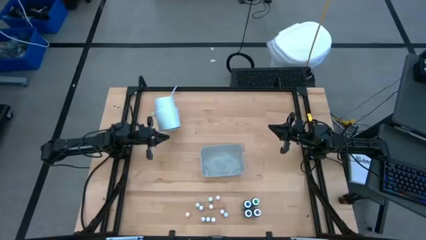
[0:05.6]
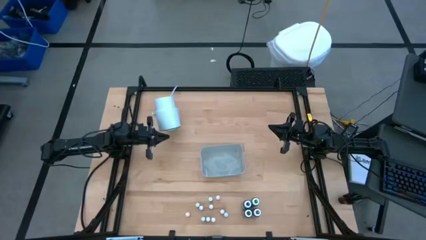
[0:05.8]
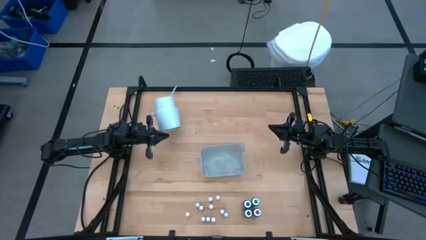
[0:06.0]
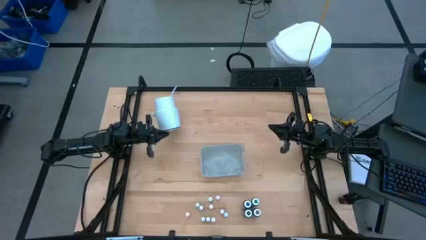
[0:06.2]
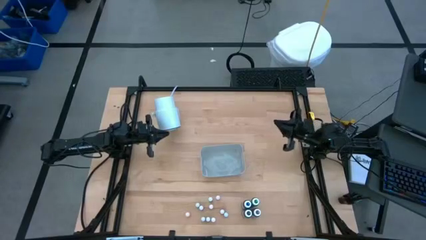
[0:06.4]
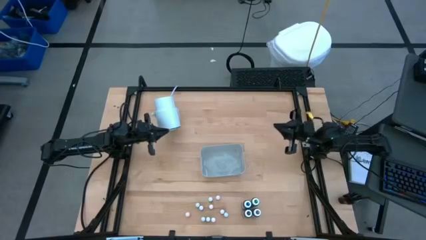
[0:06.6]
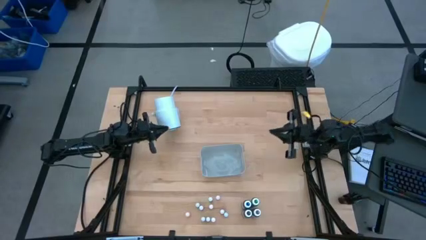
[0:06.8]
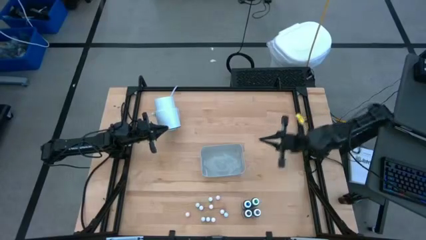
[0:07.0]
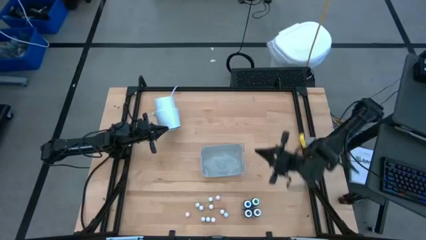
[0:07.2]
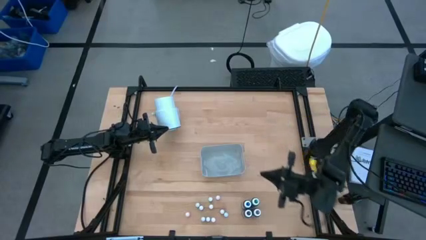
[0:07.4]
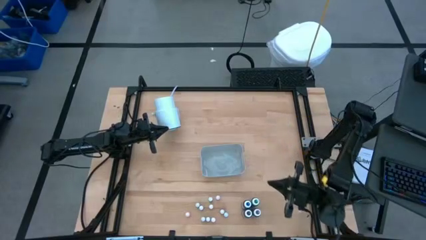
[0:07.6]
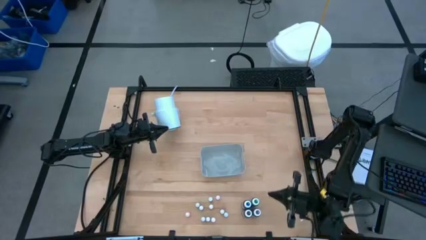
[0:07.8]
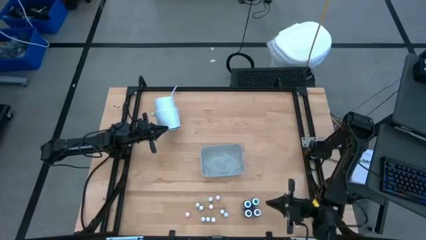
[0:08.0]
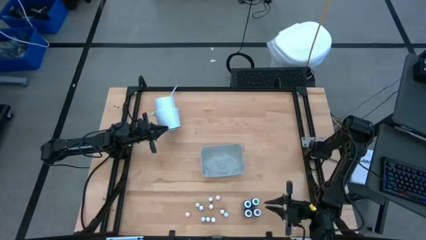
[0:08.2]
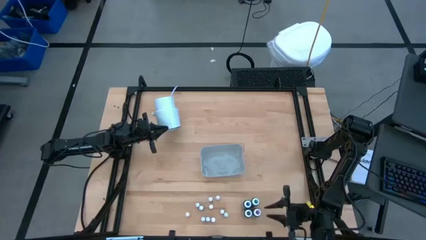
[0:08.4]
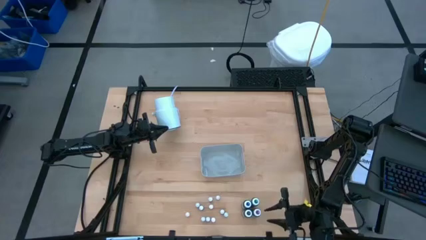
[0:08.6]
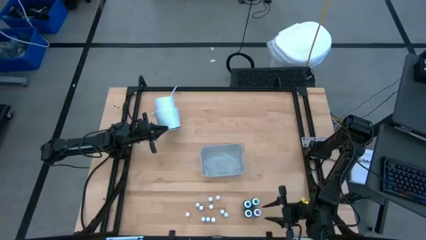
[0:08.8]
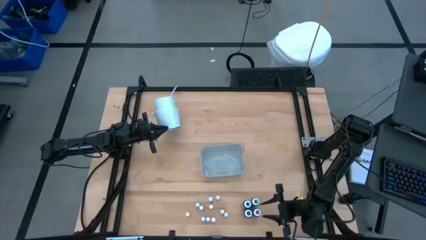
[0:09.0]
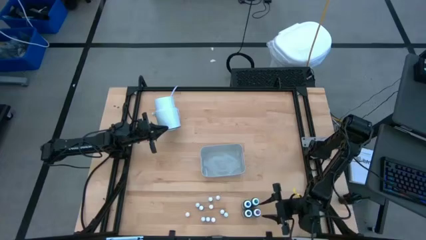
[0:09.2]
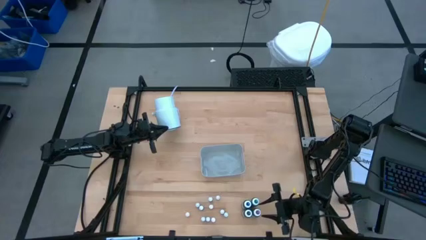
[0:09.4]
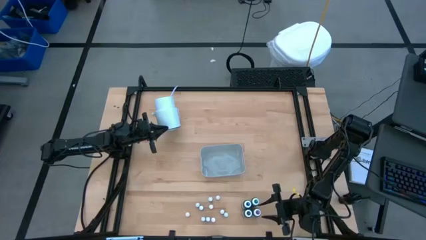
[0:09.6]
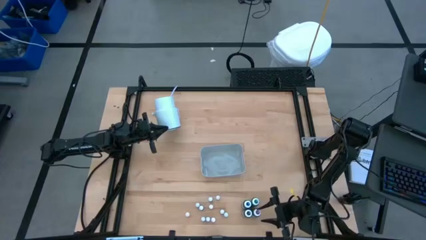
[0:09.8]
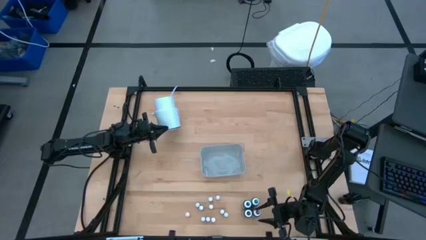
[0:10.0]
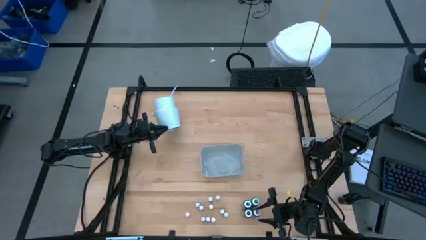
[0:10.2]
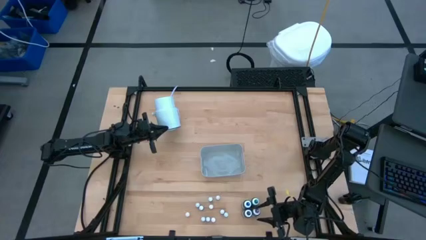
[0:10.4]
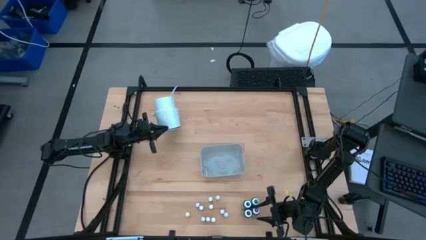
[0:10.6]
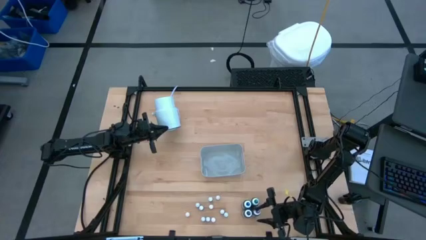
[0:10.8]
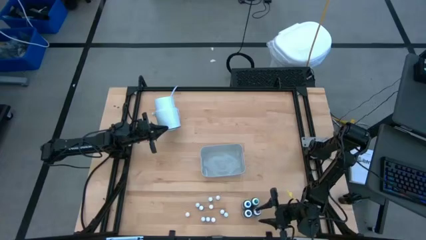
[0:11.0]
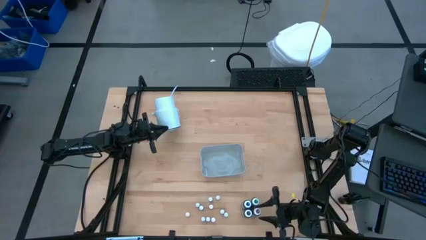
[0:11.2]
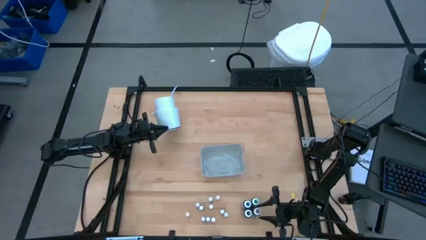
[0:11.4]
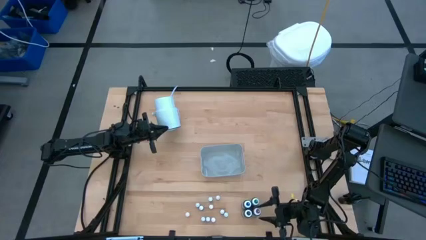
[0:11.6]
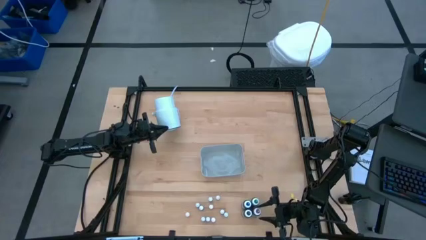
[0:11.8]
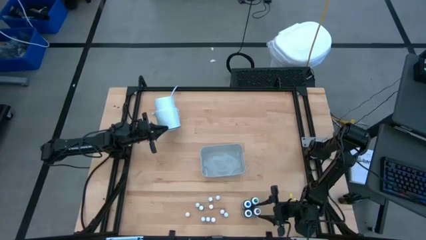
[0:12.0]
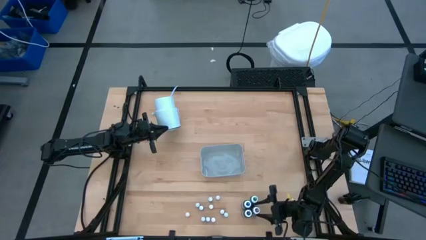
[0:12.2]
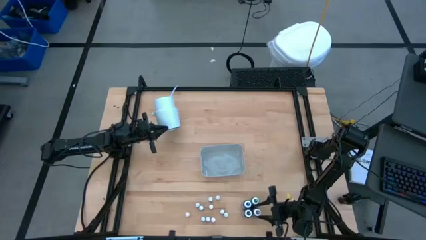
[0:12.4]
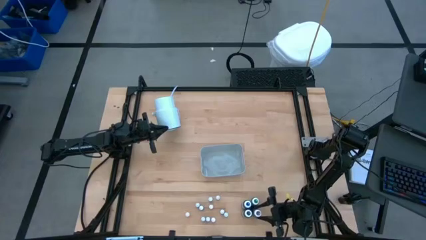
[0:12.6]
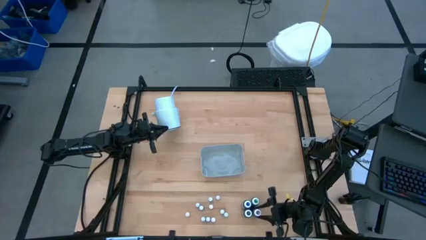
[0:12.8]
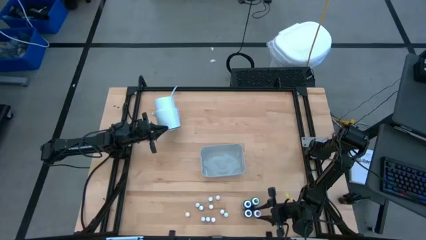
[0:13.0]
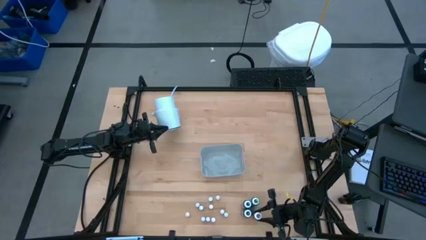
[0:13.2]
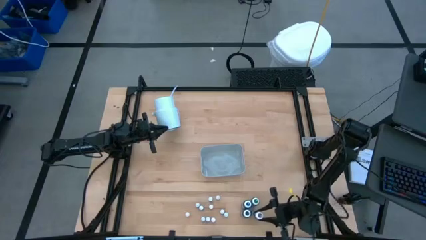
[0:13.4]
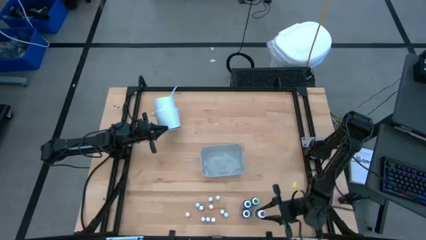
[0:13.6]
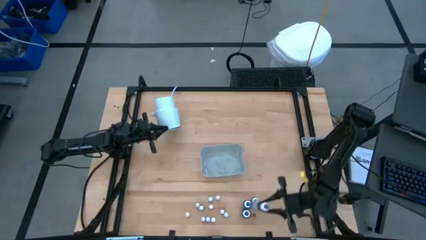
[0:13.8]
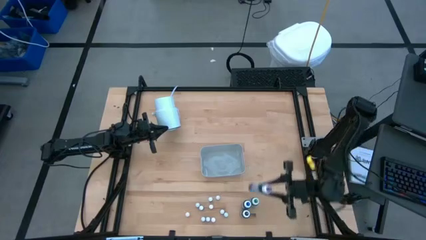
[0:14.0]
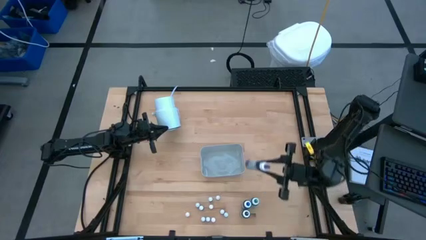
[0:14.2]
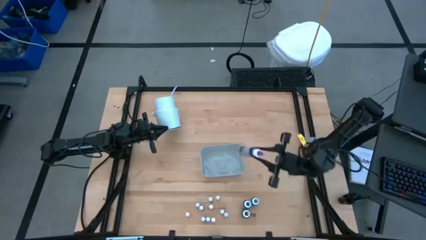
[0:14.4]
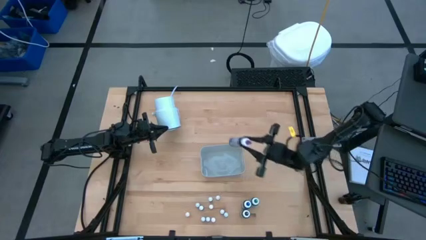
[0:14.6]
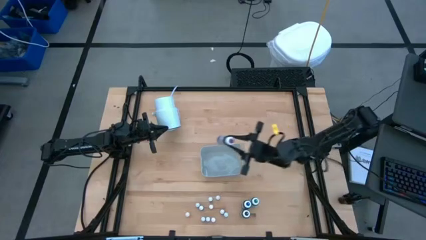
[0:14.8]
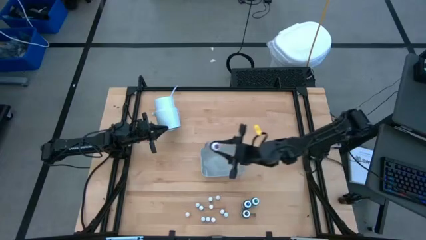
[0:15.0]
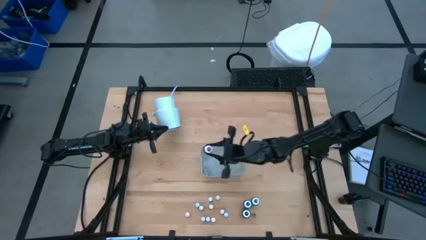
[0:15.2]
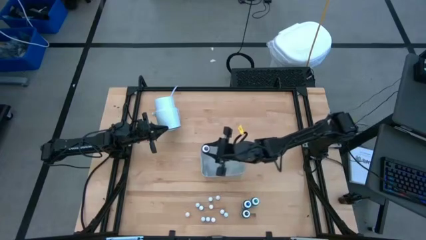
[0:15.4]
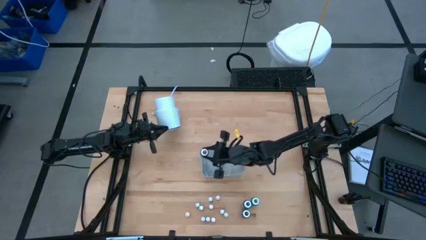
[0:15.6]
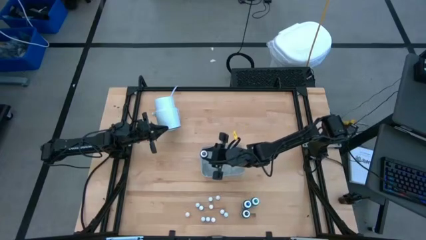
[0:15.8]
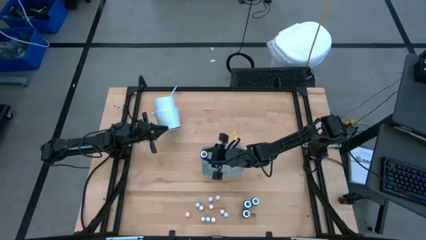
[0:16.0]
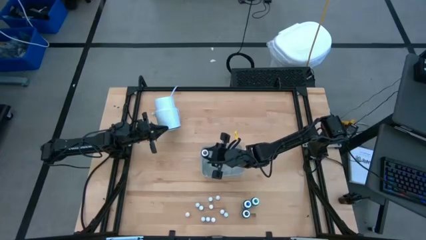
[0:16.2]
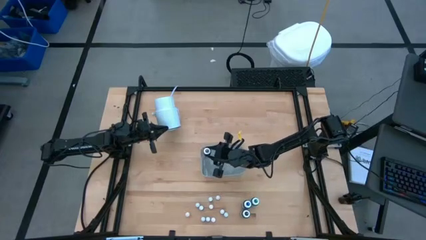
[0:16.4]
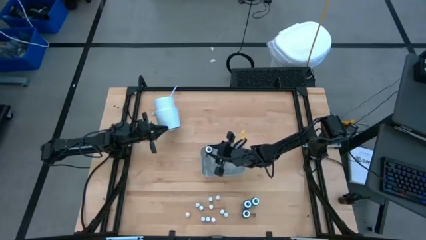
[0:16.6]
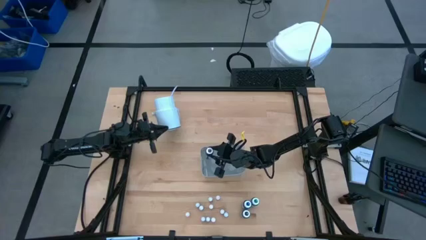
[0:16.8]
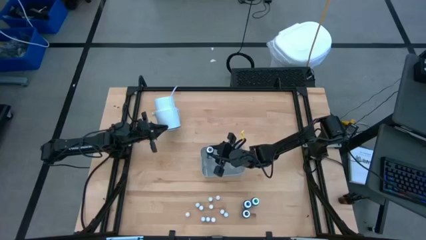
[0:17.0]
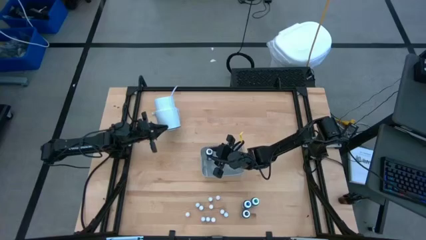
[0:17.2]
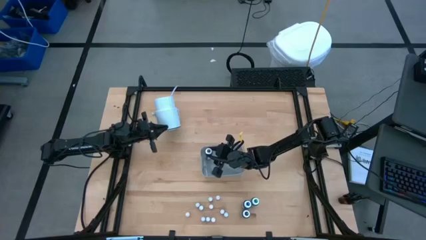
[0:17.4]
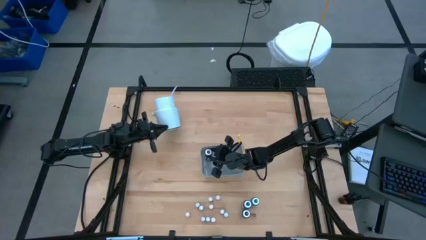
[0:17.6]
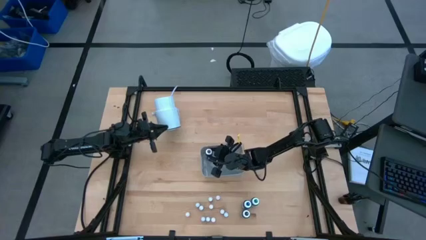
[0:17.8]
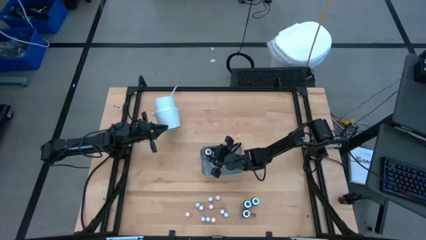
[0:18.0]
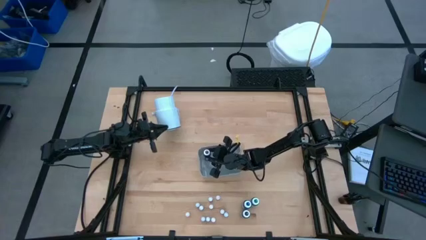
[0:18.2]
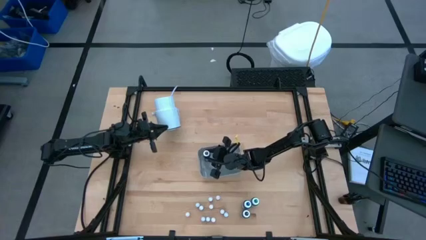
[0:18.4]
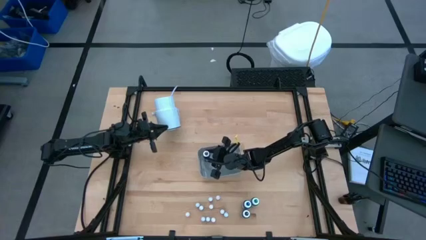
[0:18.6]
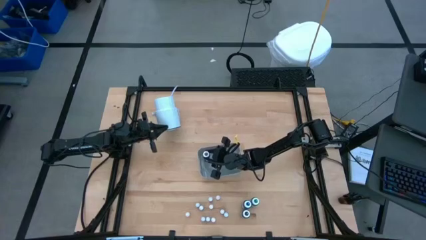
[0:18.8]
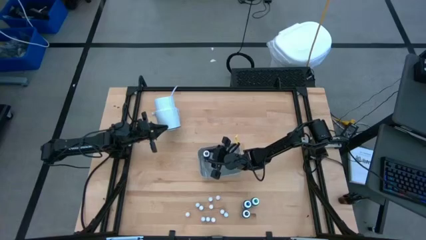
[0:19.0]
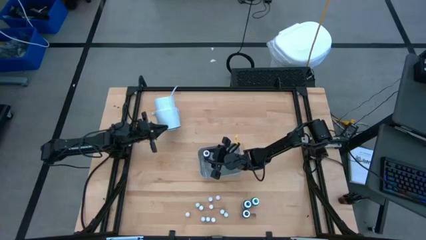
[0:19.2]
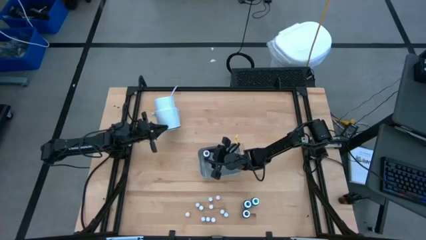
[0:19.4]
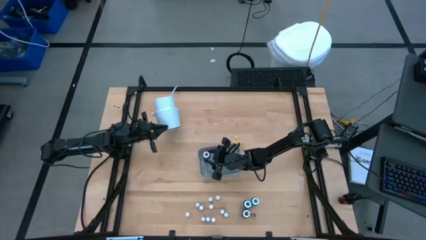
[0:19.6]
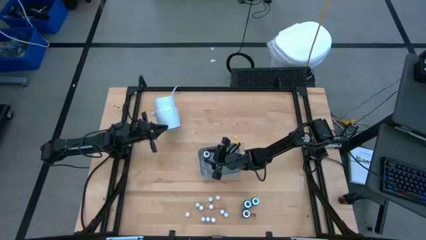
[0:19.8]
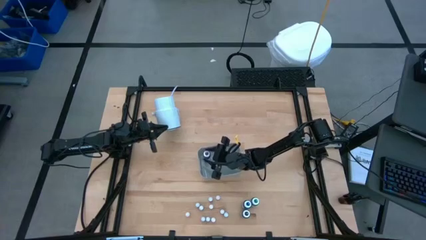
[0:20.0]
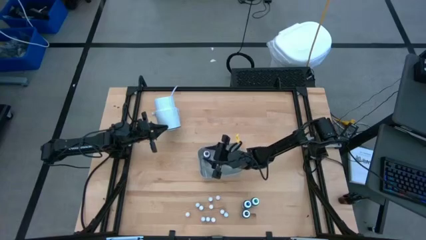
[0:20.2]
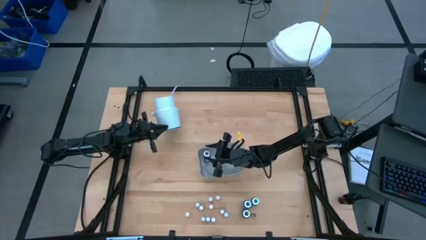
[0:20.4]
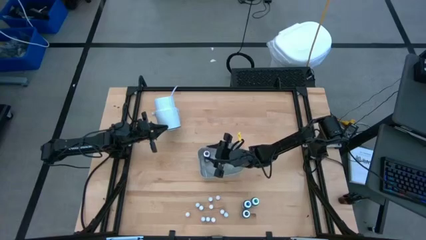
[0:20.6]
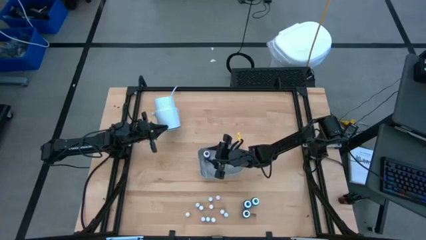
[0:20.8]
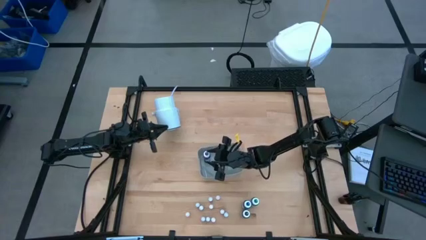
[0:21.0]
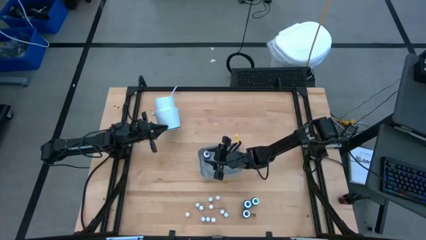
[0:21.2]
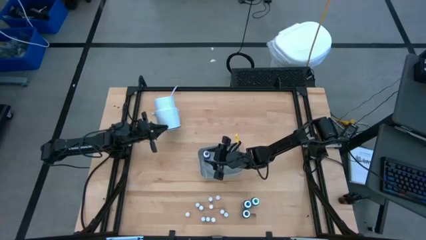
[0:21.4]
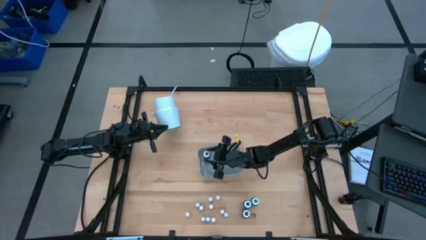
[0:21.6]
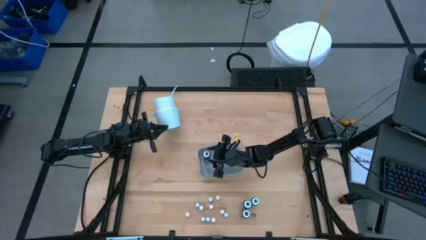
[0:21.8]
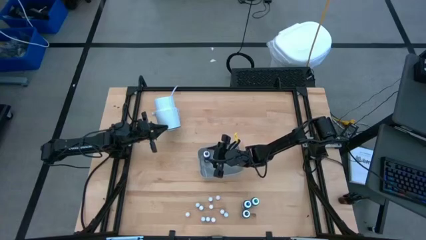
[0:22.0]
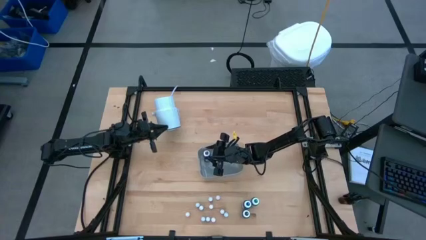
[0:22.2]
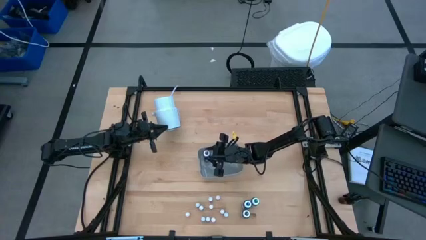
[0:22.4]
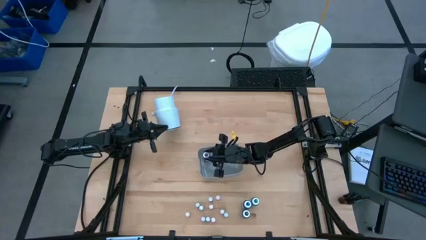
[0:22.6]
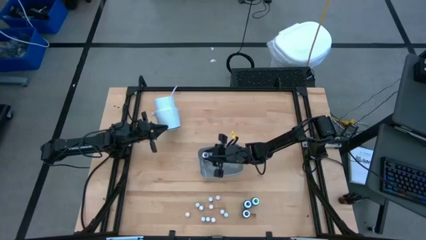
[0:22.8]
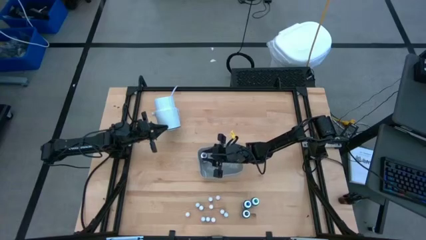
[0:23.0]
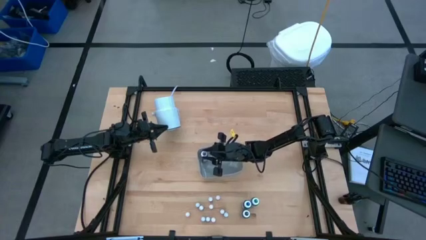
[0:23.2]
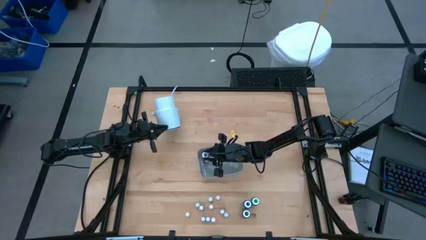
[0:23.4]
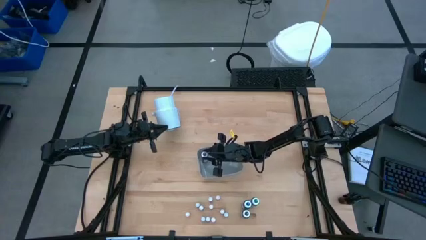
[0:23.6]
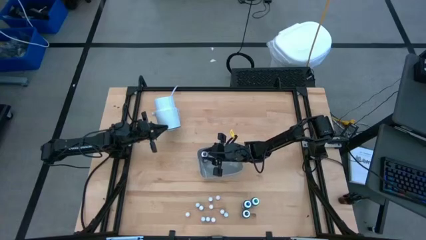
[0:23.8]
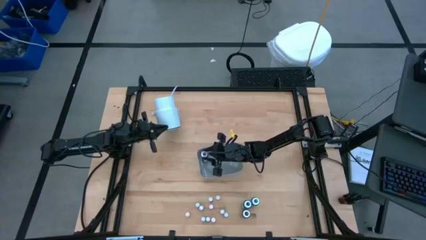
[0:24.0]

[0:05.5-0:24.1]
Task: Pick & Place food coloring
Put the large purple food coloring bottle into the bin
